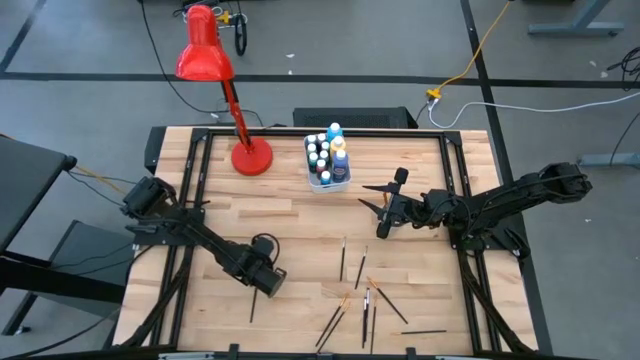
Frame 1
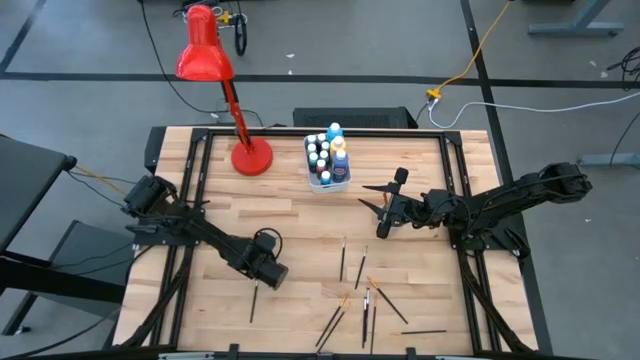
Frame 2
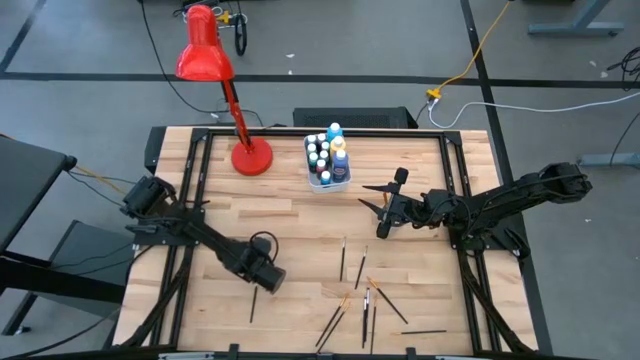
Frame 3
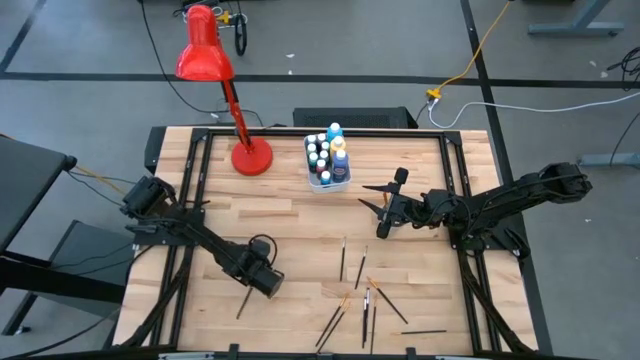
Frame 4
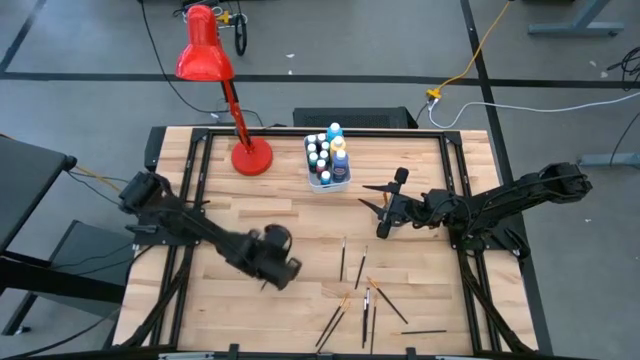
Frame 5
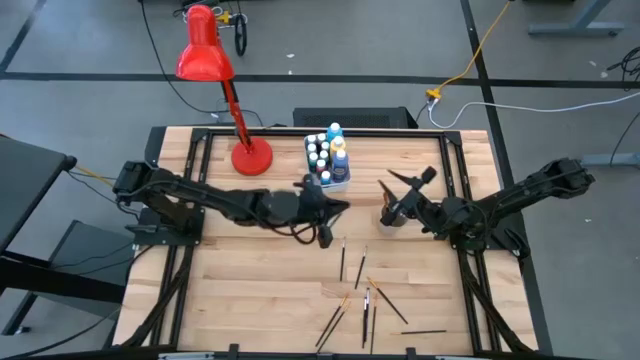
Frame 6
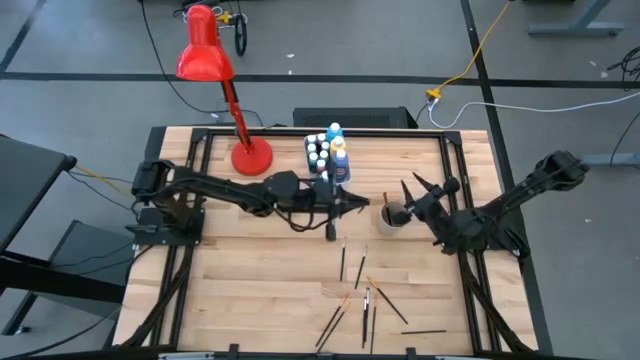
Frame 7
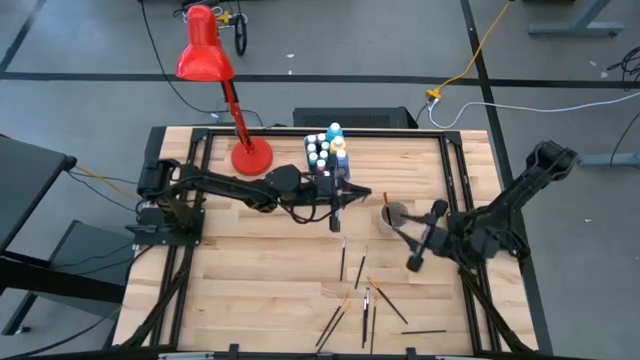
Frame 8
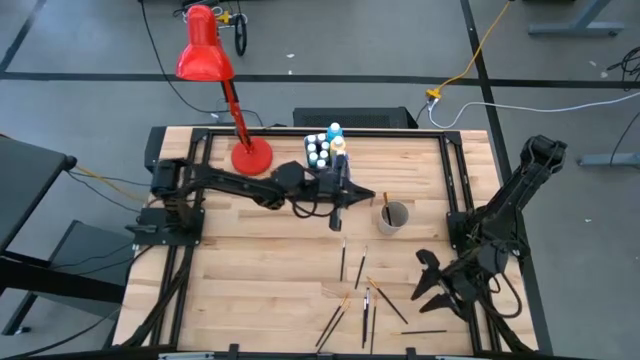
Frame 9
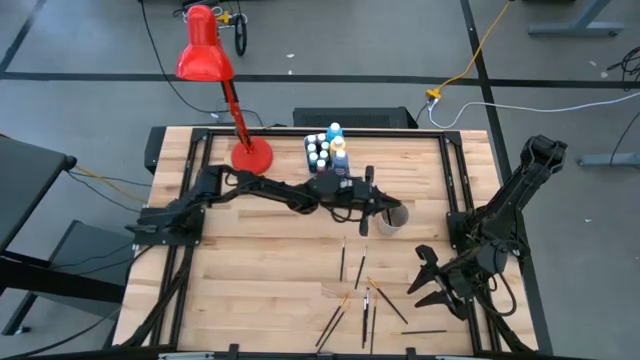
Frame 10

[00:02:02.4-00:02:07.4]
Task: Pick & Place Paint Supplies
Put the silver paint brush into the gray cup

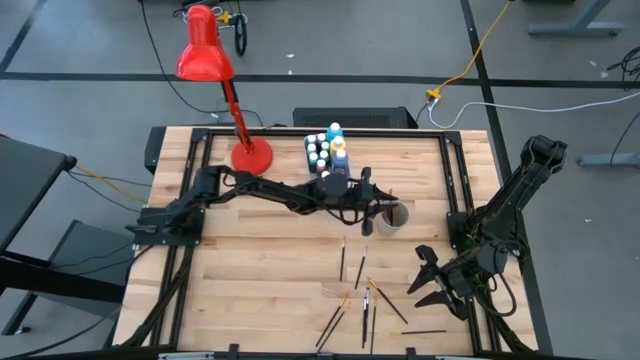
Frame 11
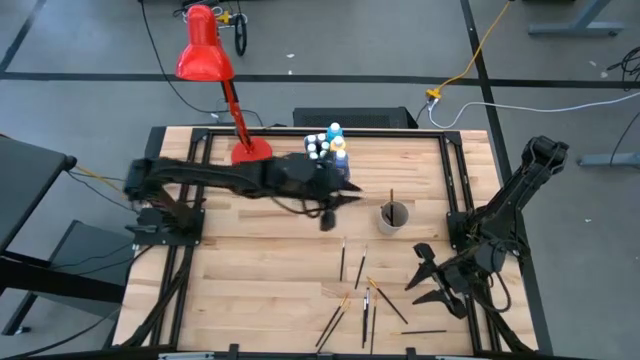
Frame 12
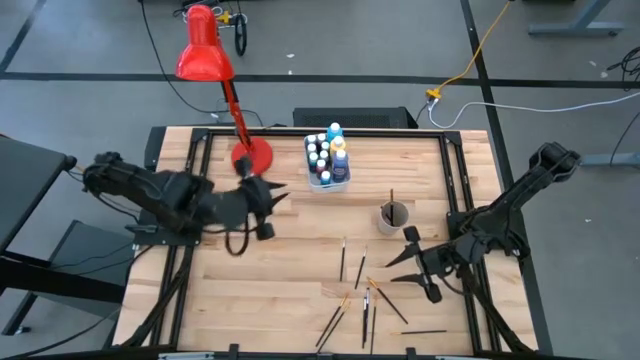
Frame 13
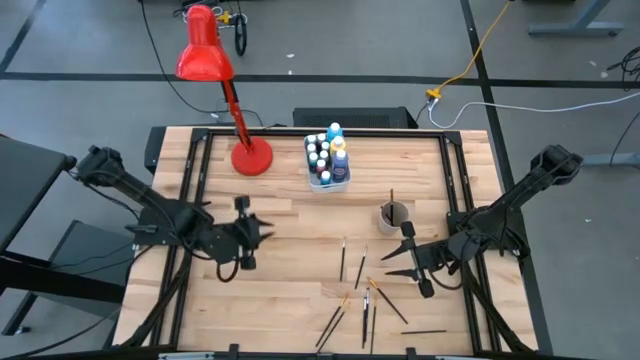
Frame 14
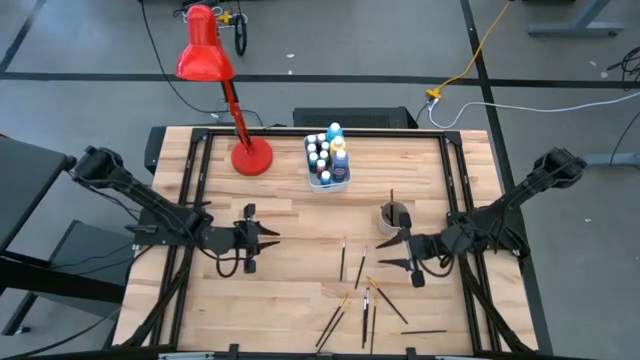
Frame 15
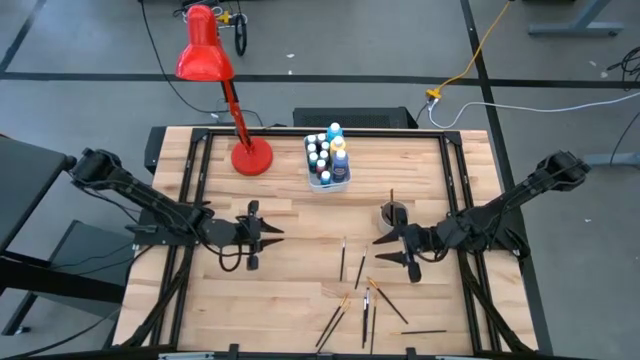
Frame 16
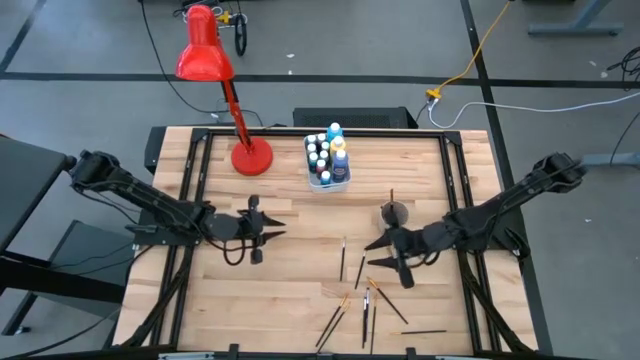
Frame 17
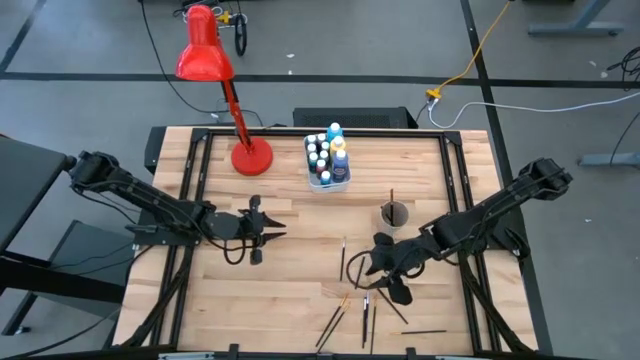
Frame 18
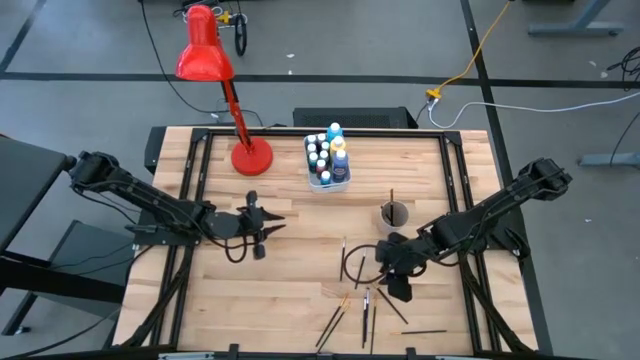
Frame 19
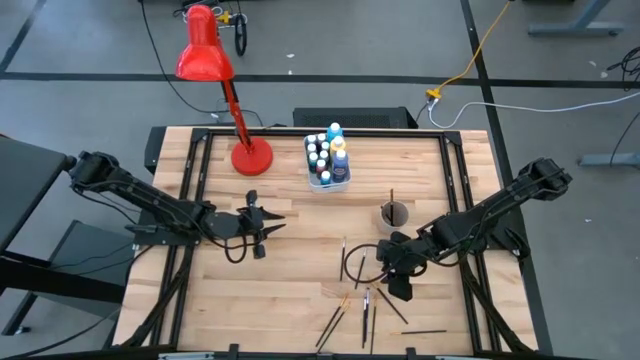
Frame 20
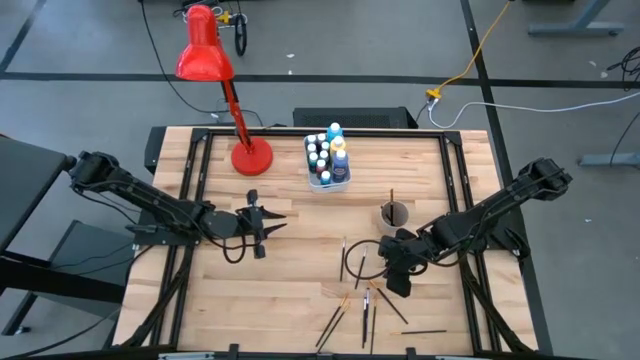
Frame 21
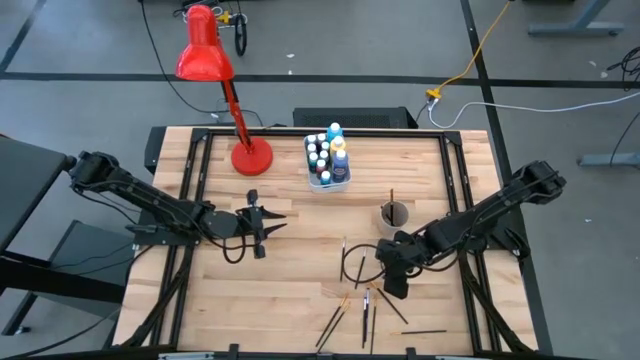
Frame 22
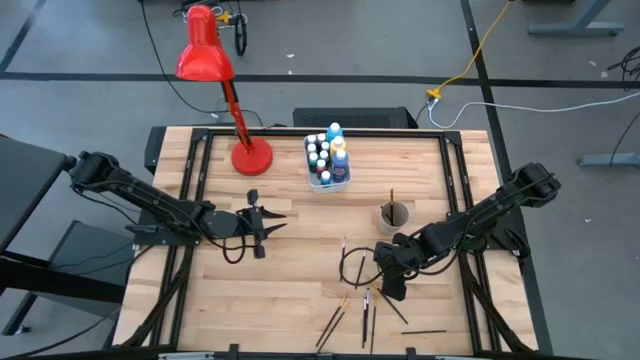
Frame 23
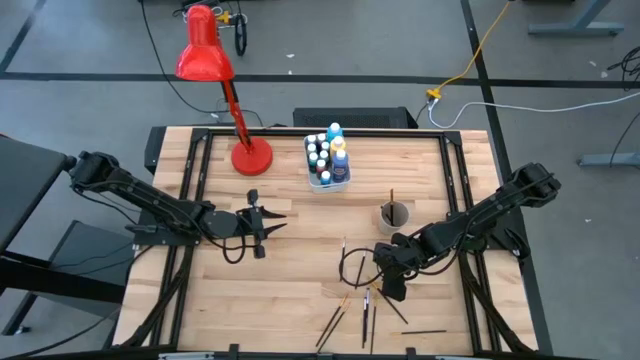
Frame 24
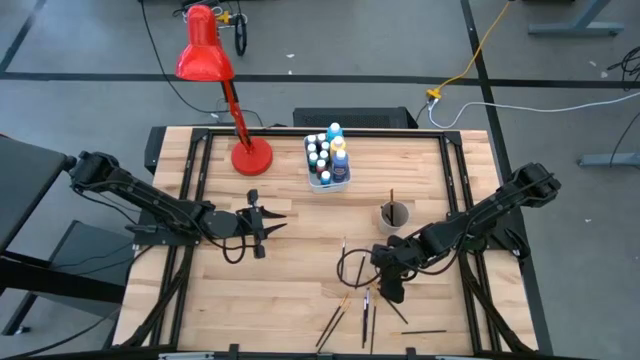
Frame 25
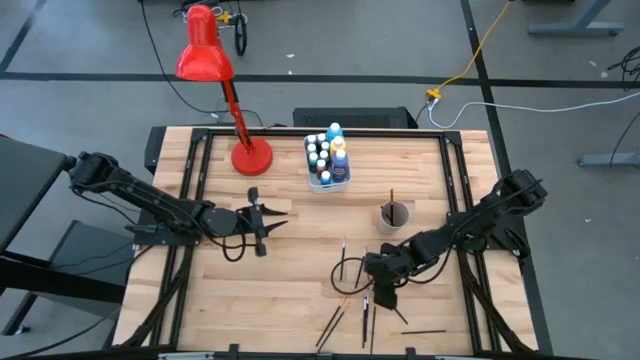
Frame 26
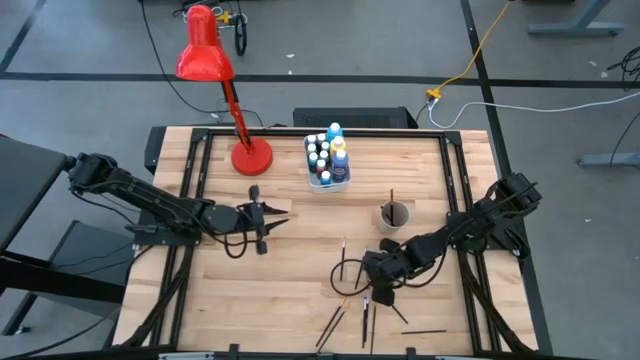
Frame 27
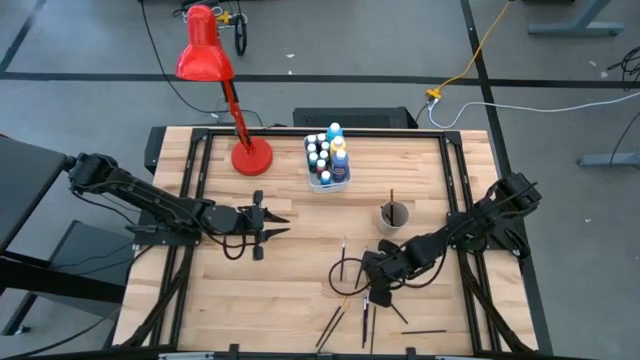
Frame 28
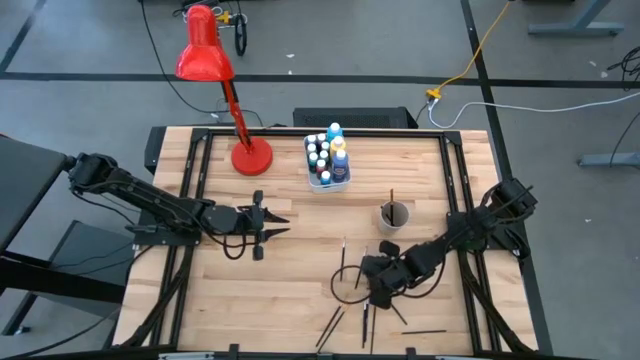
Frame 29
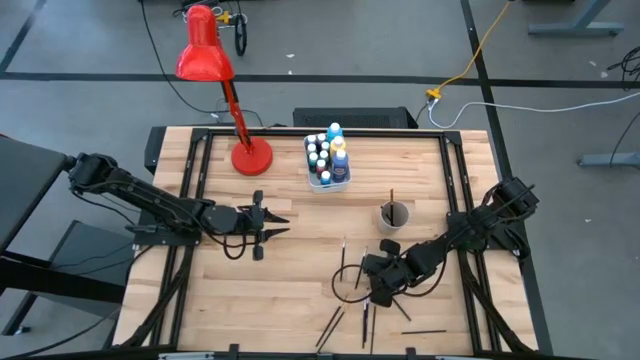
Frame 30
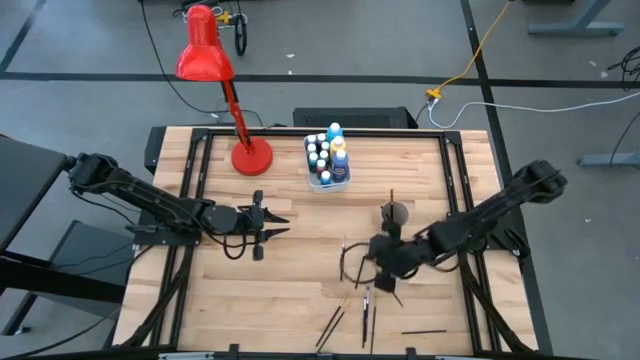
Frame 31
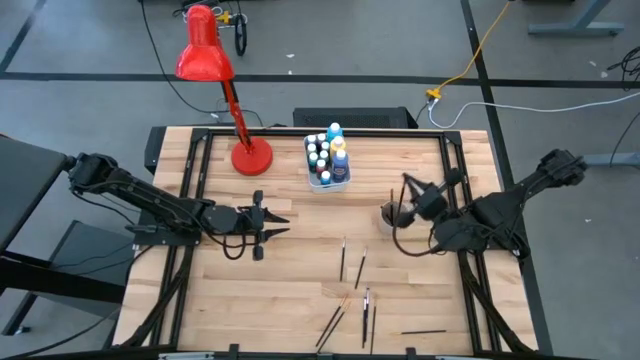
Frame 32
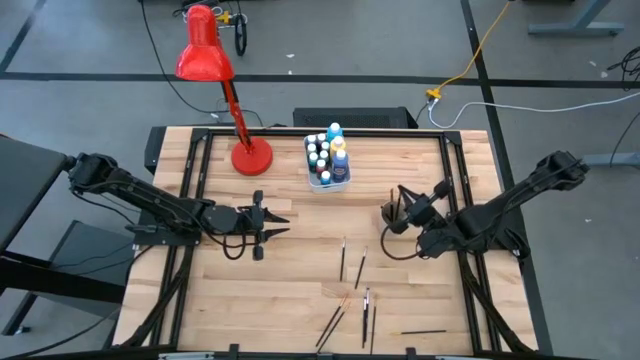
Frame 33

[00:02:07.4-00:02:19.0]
Put the gold paint brush into the gray cup

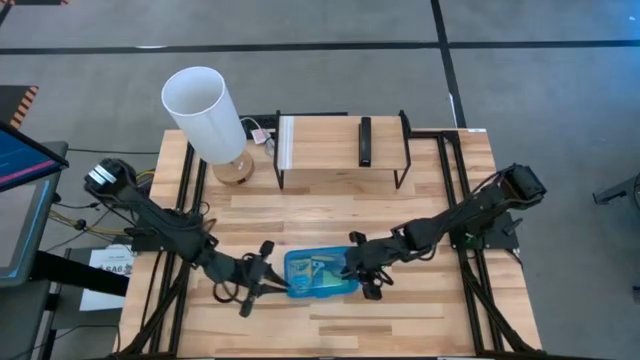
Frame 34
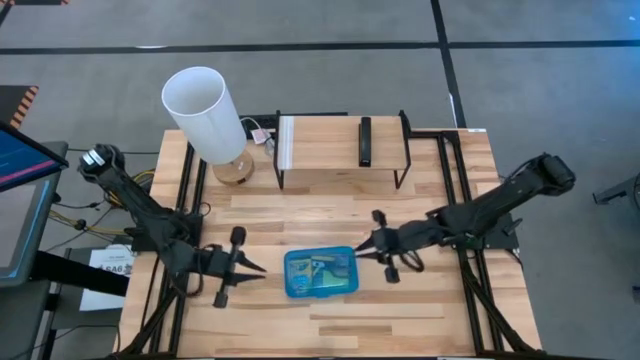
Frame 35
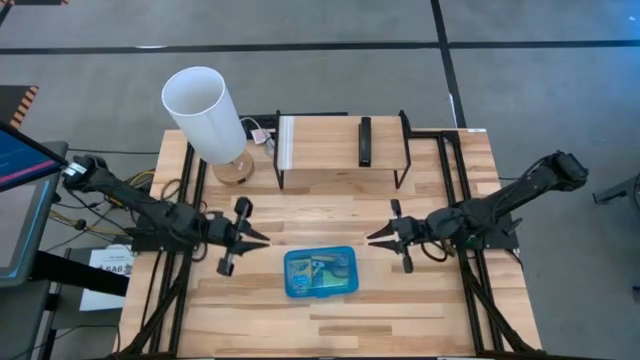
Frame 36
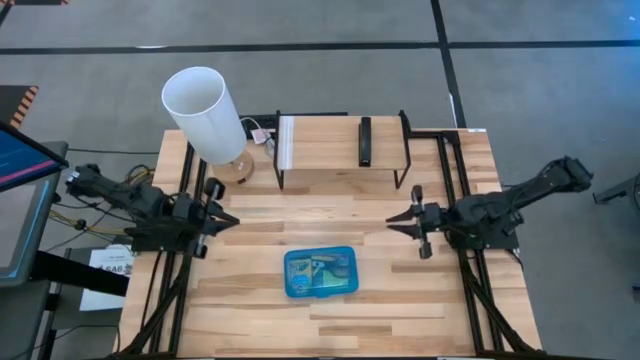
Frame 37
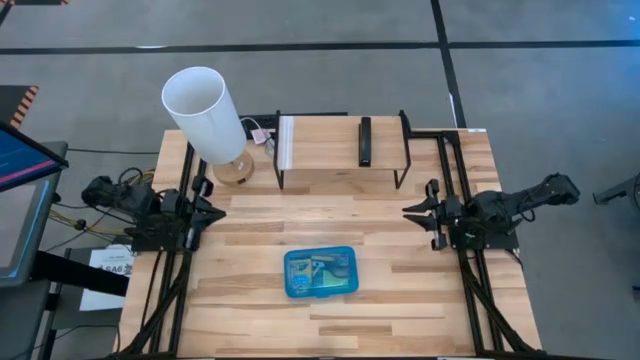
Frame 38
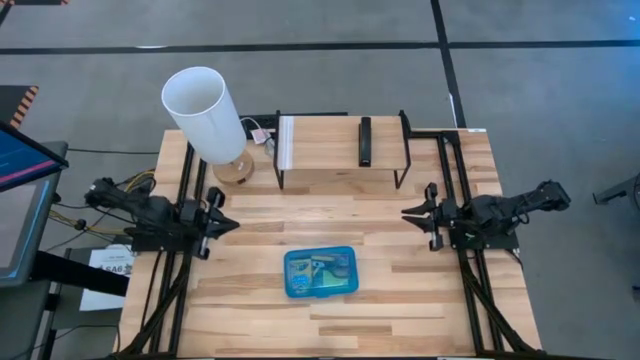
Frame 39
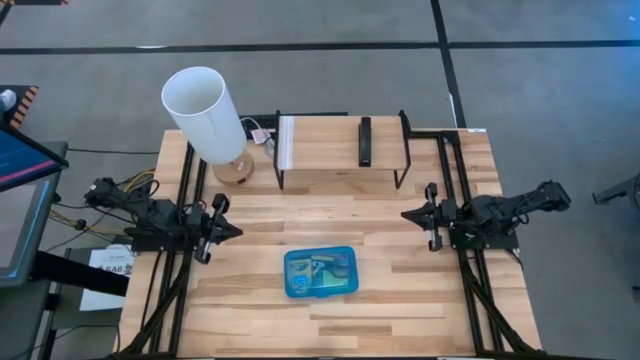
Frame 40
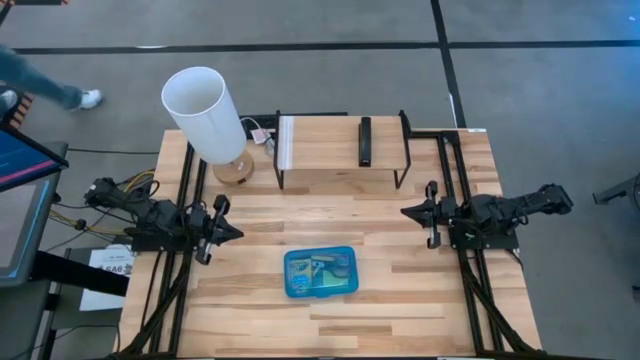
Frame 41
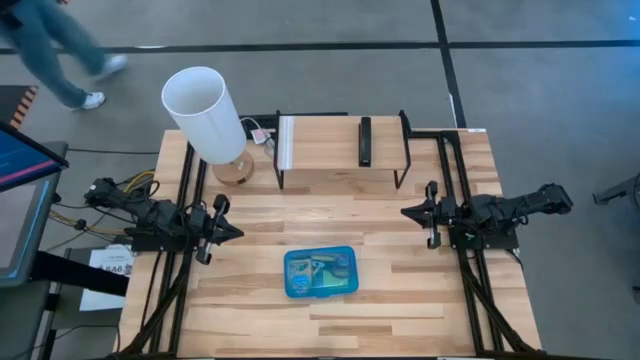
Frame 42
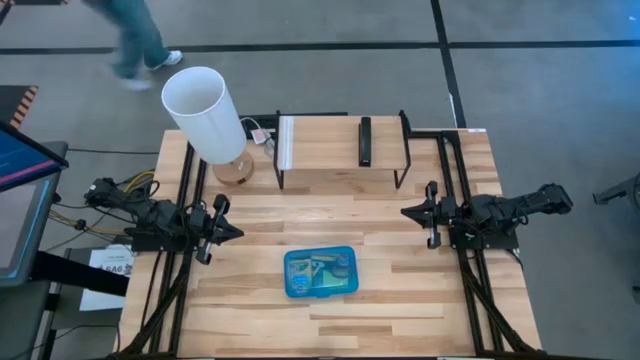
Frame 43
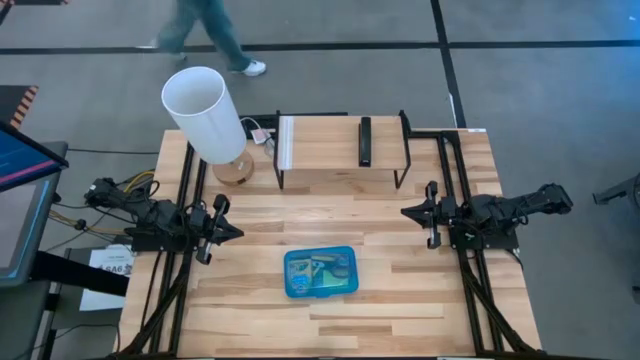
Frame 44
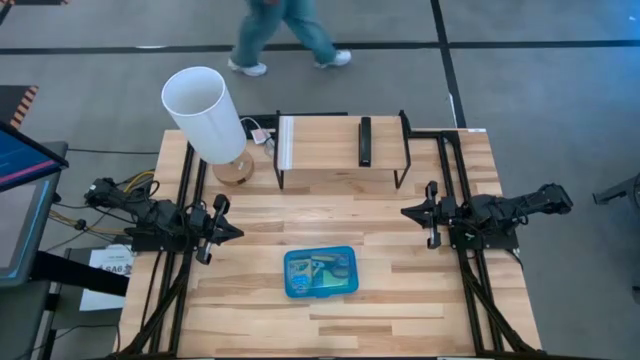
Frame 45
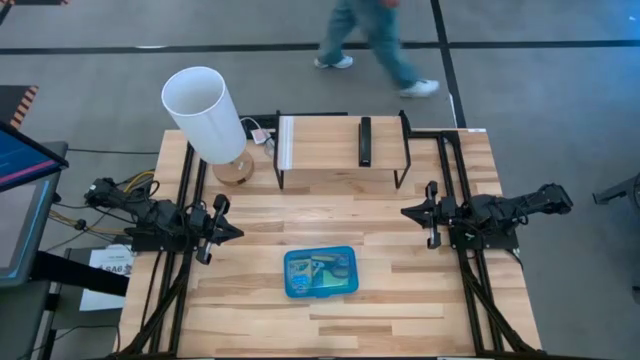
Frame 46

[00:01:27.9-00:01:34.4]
Task: Pack school essentials
Return to Home Position
